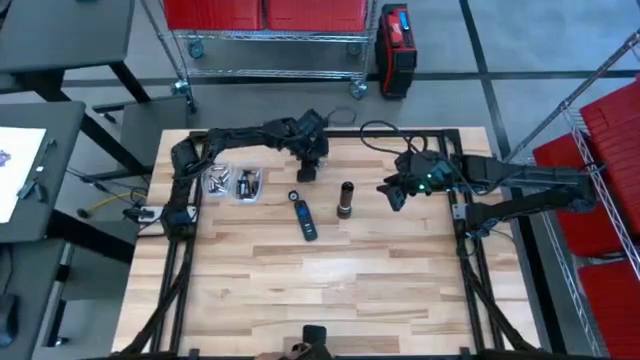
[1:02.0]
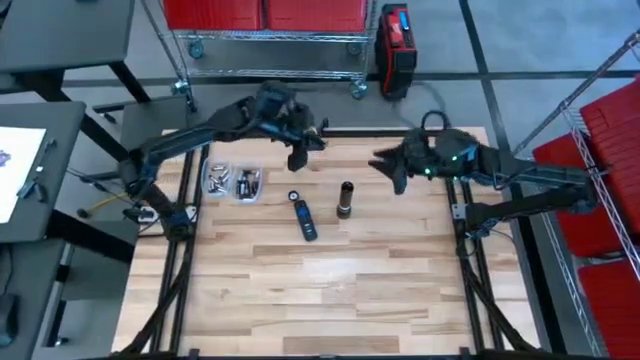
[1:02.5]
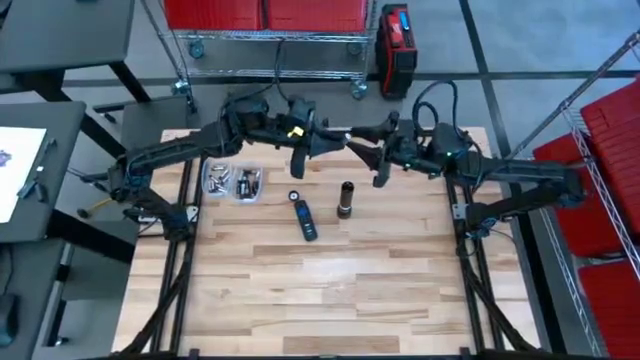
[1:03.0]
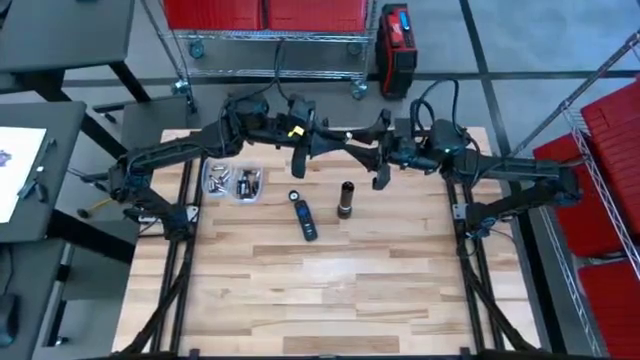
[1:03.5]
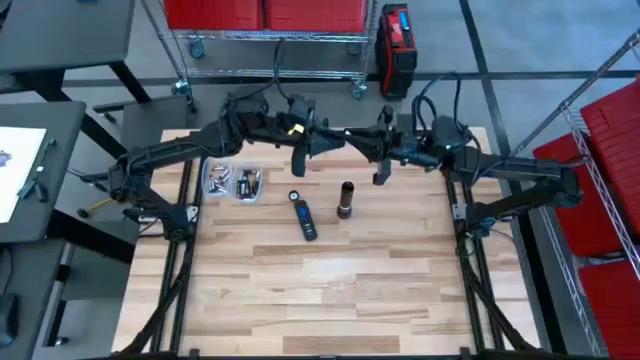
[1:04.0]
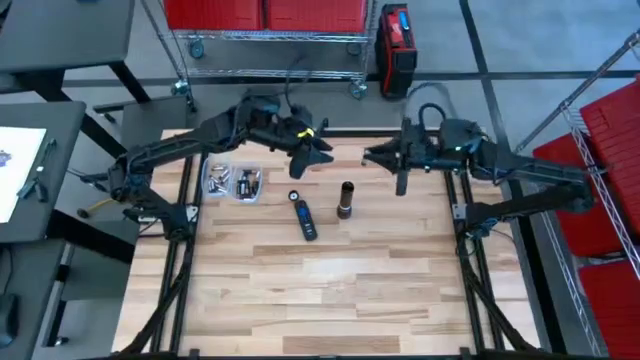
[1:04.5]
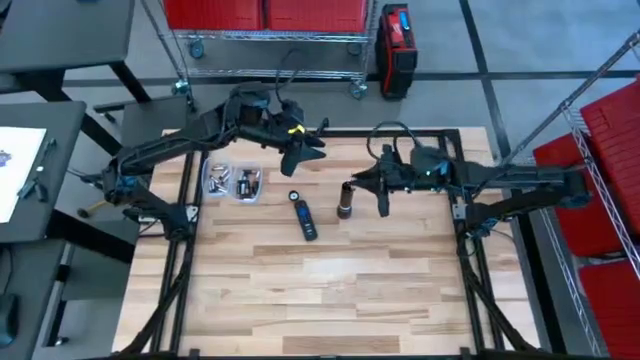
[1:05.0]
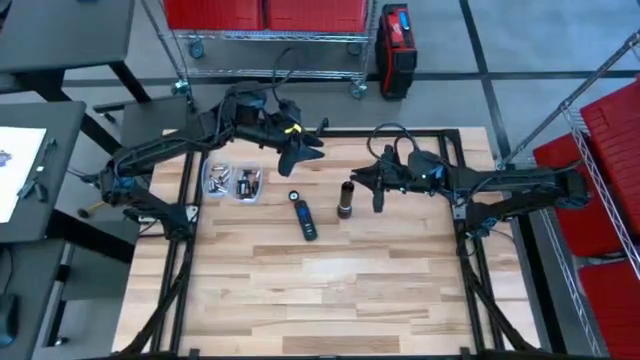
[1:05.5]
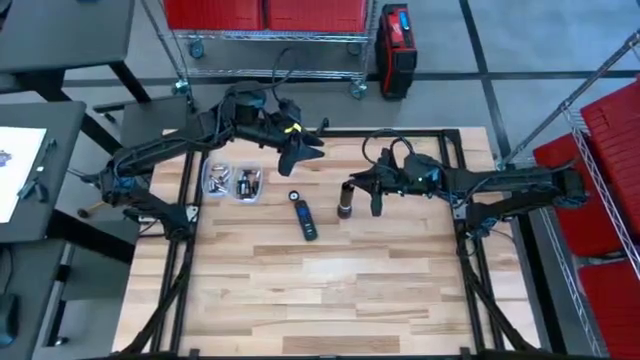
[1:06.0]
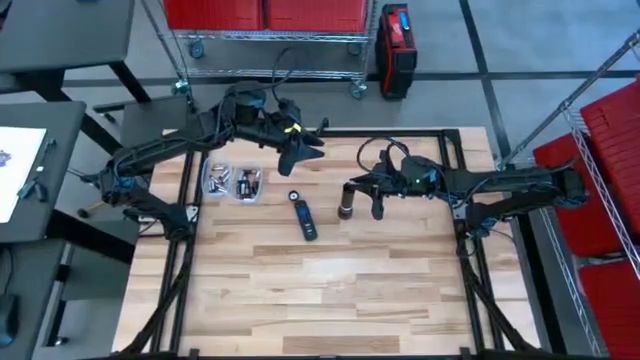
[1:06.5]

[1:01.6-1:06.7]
Task: Insert battery
Insert the silver battery into the flashlight's battery compartment

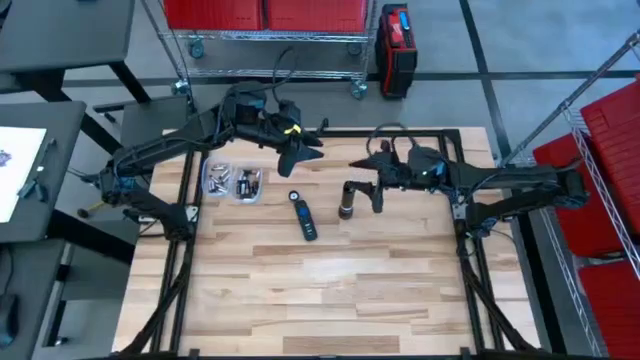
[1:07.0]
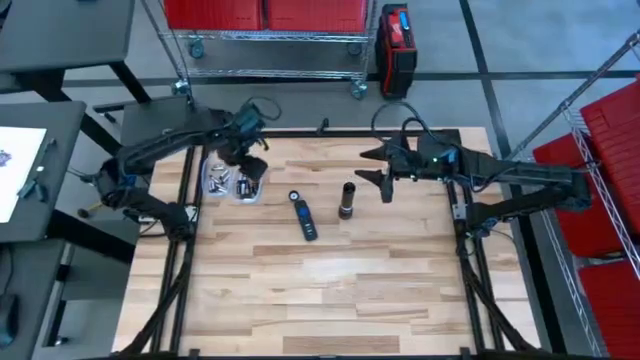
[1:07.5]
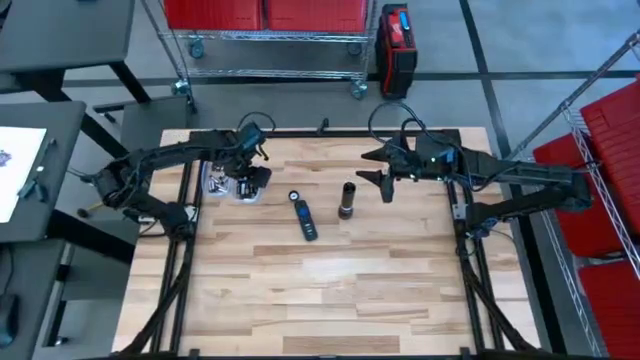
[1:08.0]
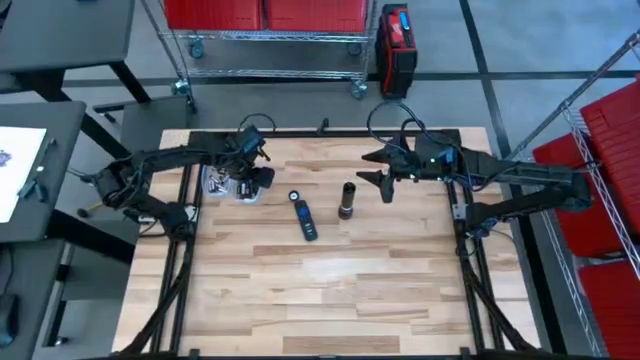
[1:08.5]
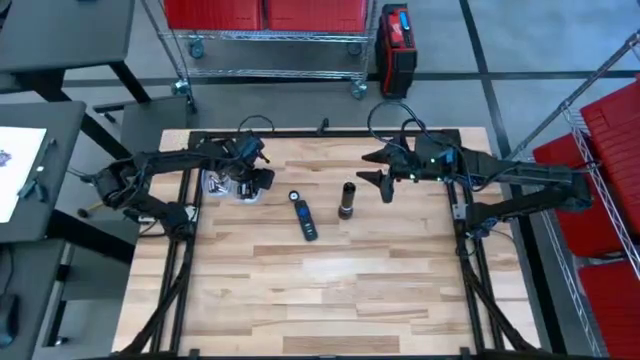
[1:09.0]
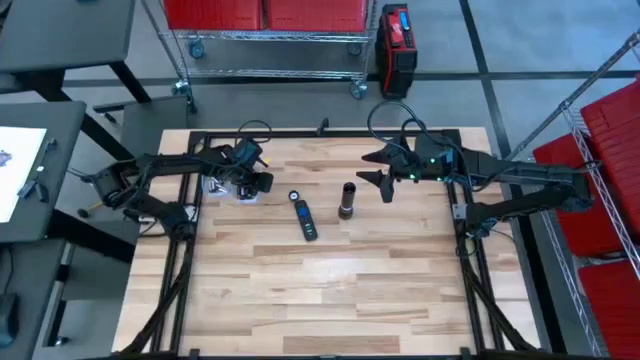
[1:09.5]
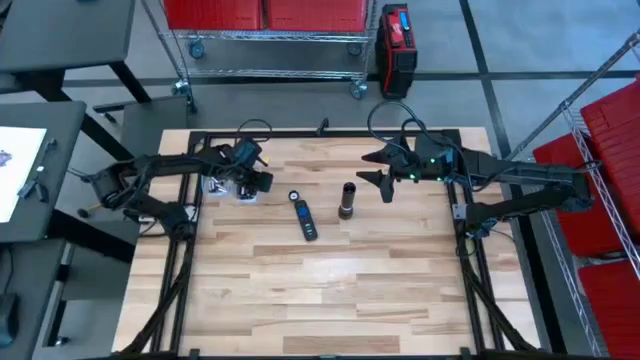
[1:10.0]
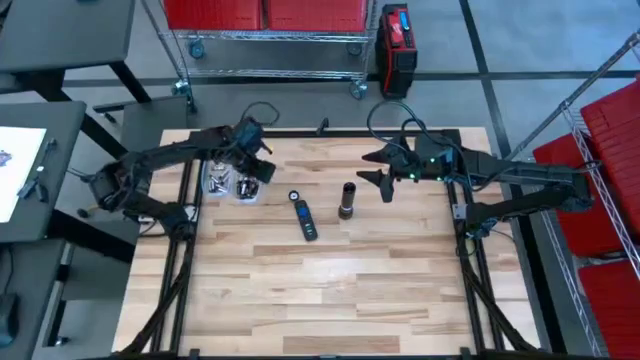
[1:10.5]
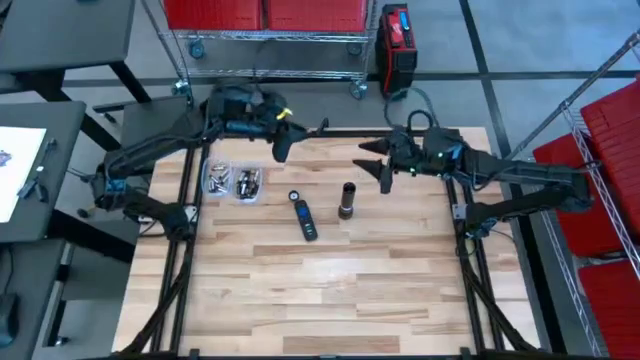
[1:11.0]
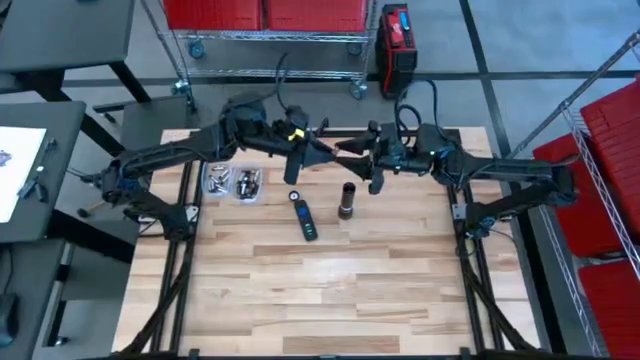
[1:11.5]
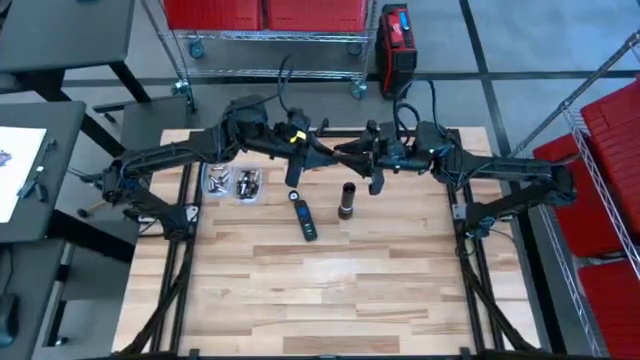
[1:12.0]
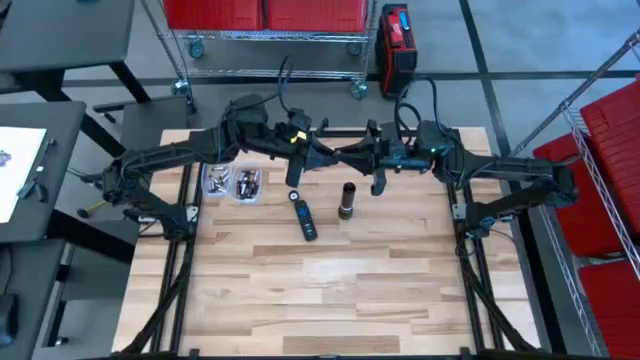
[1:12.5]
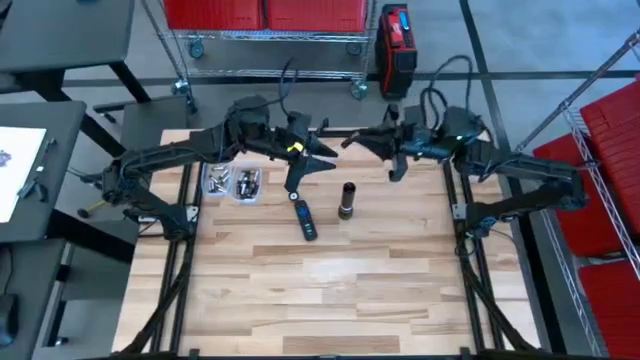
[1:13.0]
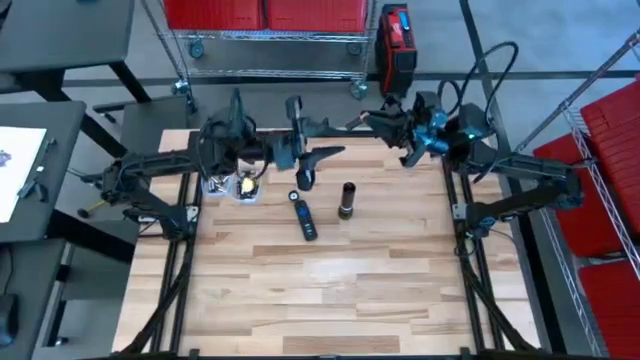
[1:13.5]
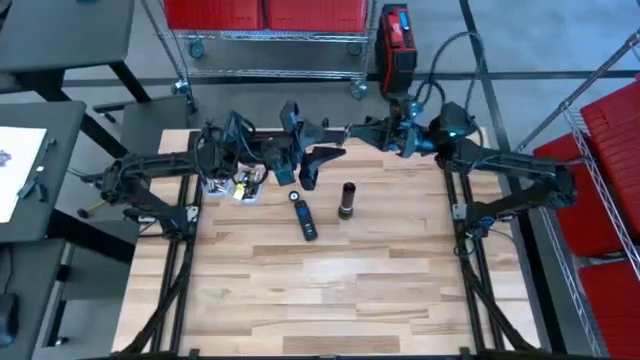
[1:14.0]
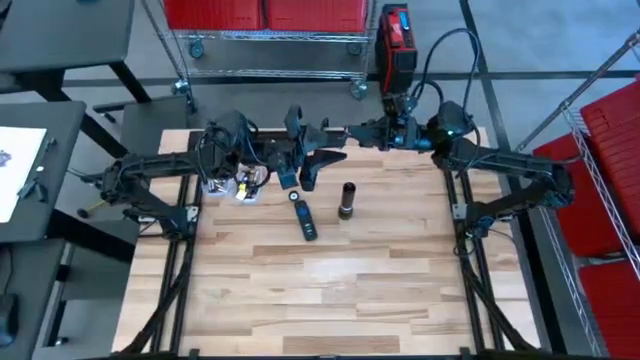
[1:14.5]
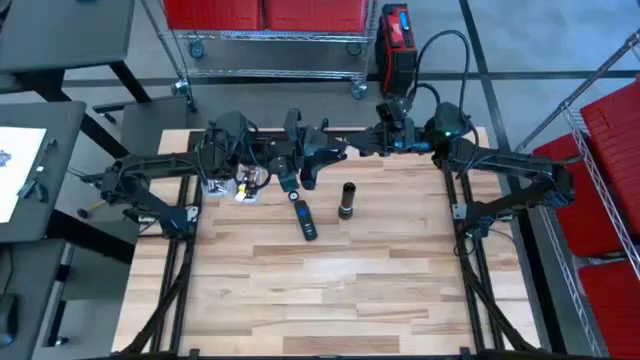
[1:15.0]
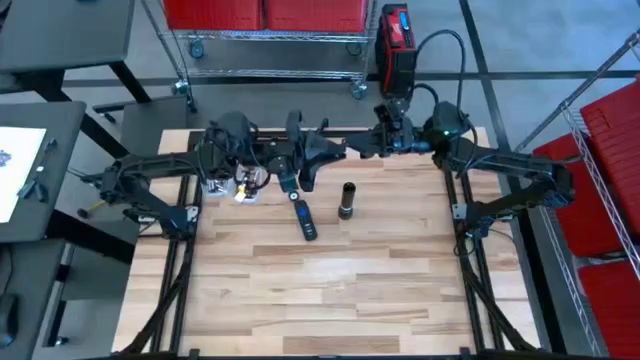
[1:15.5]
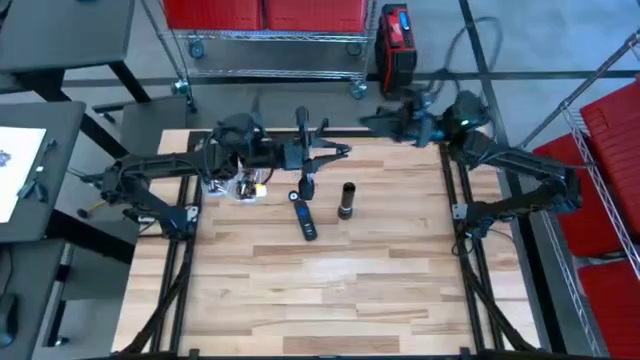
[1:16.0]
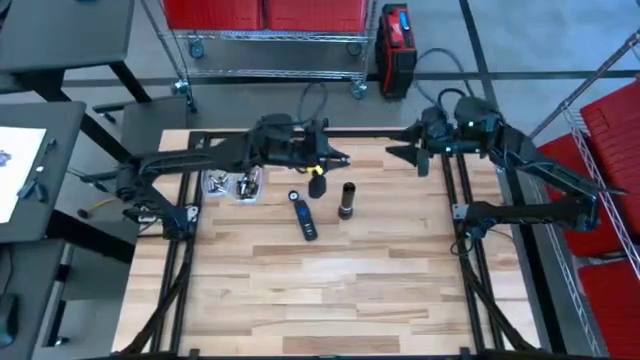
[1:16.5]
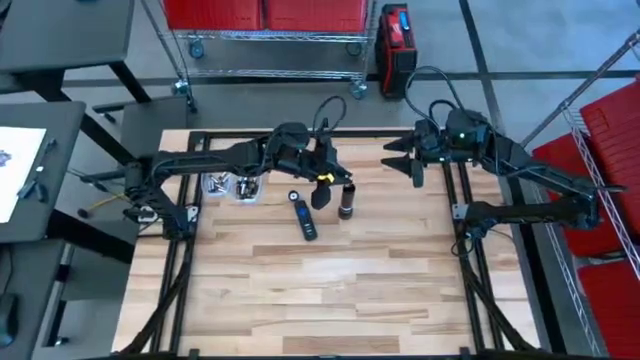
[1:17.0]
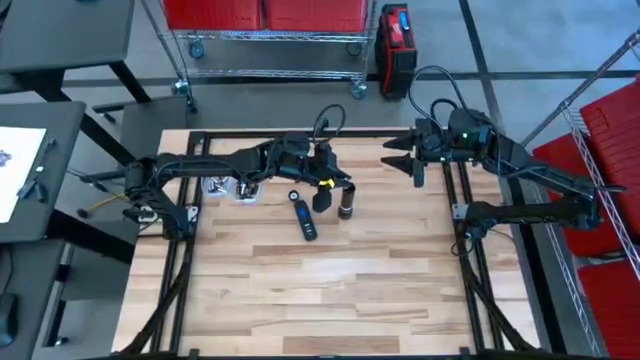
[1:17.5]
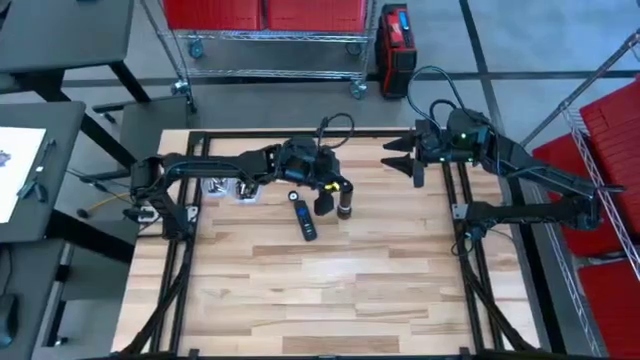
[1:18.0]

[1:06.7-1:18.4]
Insert the brown battery into the flashlight's battery compartment

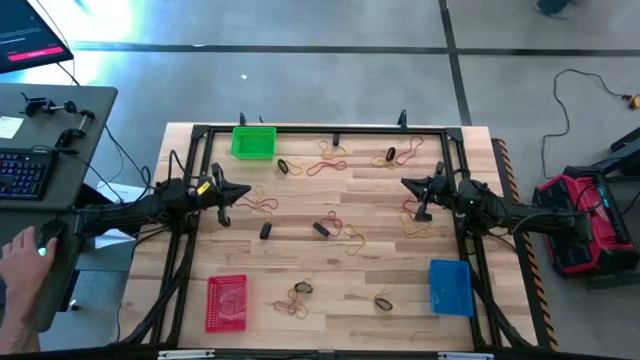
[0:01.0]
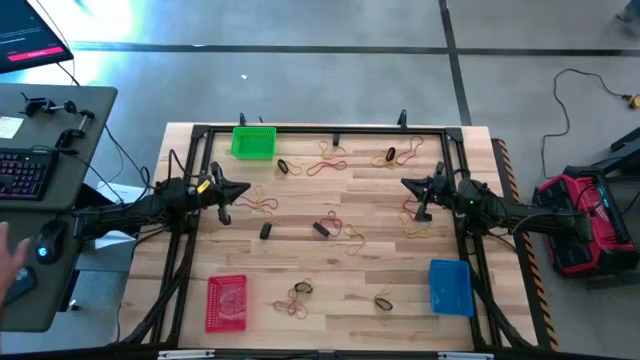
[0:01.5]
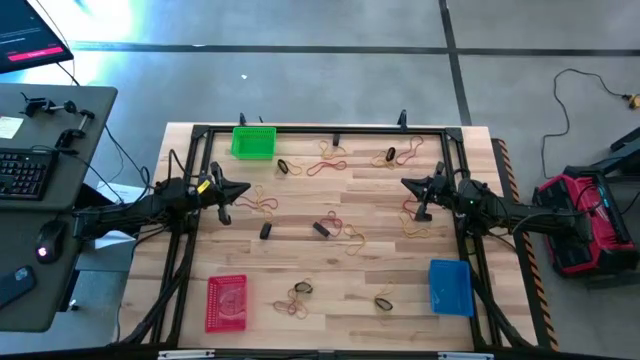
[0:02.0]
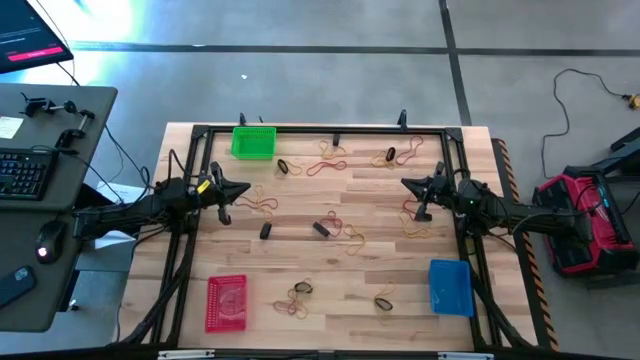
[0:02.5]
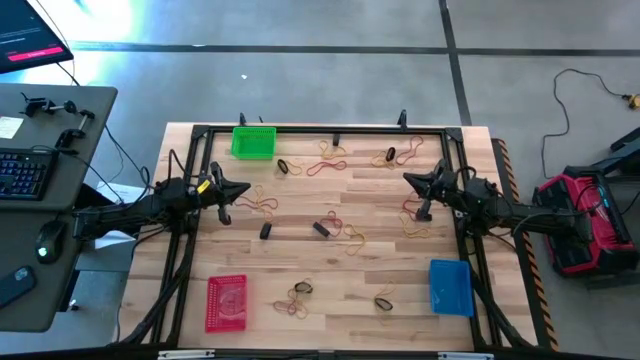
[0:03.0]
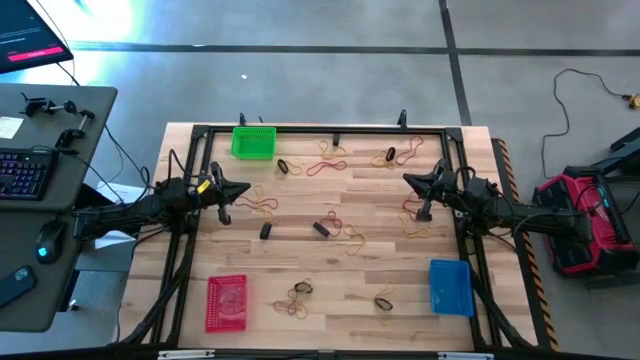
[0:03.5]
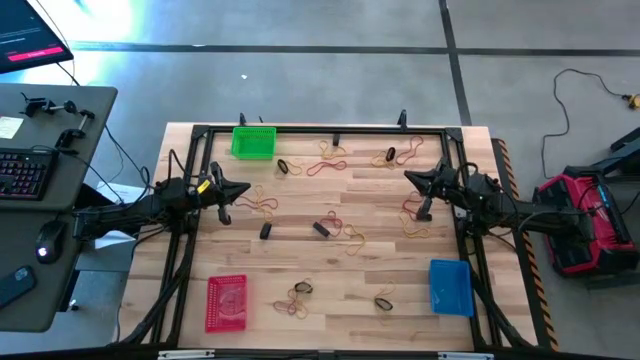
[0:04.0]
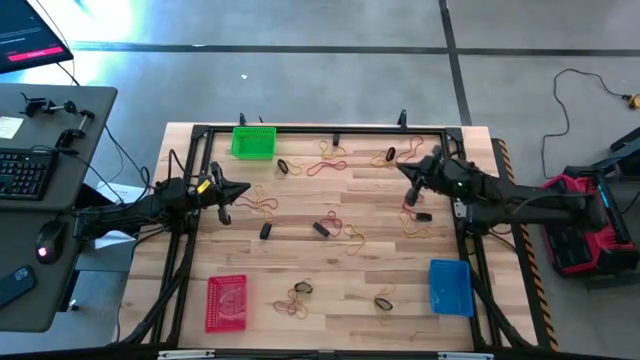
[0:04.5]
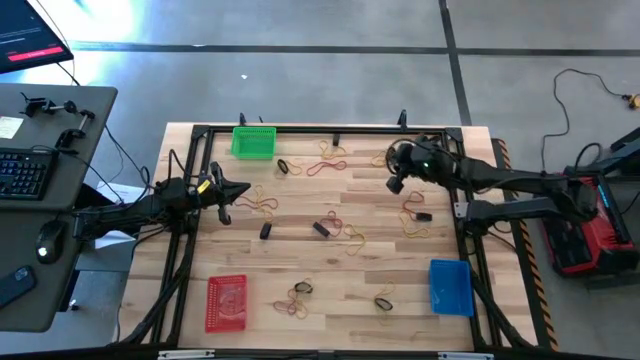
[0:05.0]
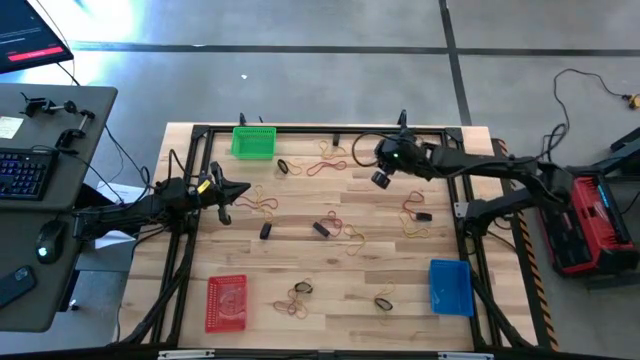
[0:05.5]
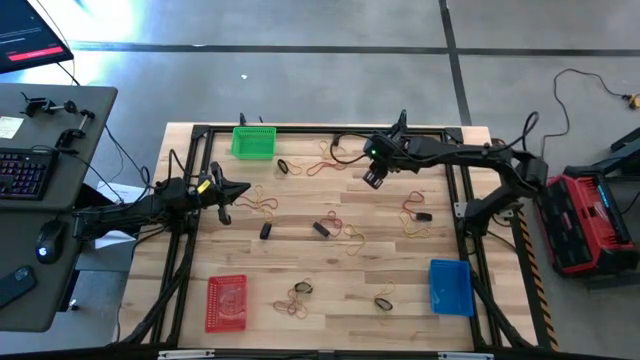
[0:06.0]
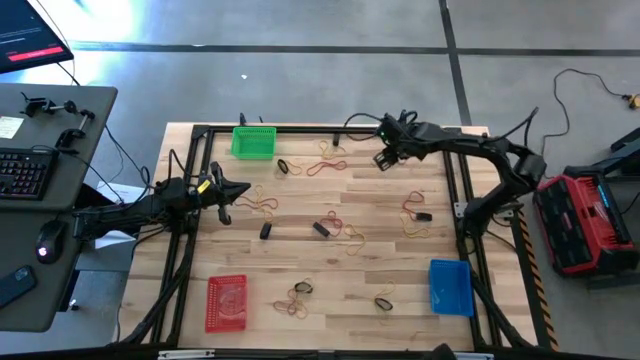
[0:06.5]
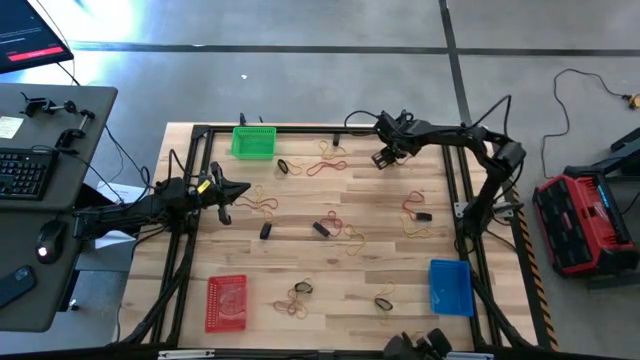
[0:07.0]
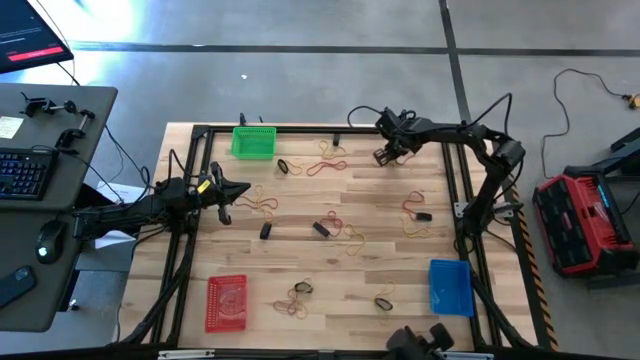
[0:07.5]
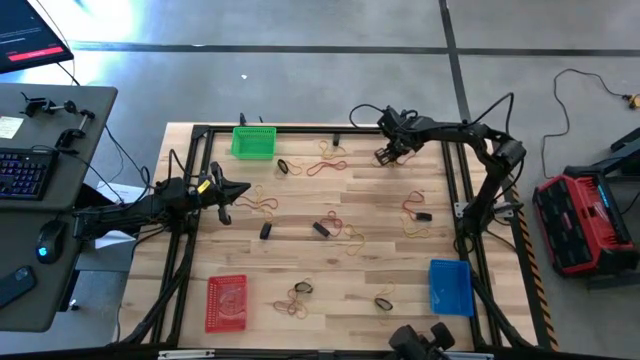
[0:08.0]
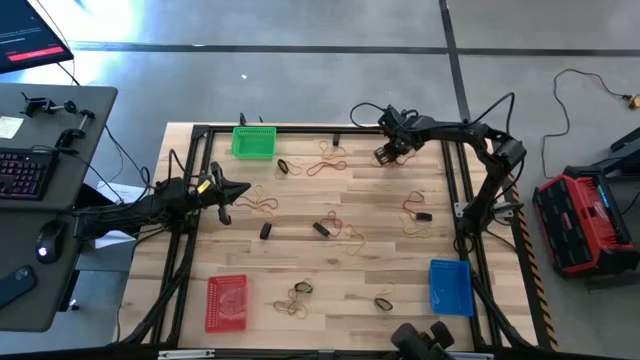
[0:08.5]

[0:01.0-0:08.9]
Task: Sort rubber bands into baskets
Put the black rubber band into the blue bin
